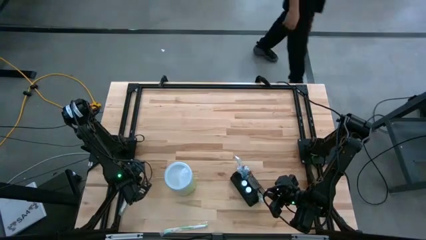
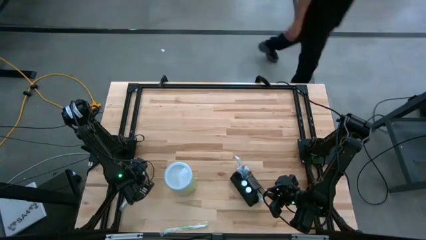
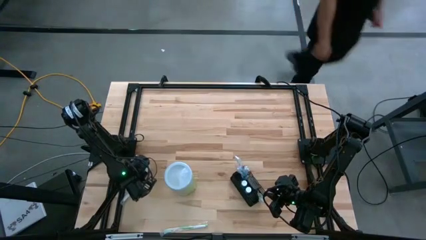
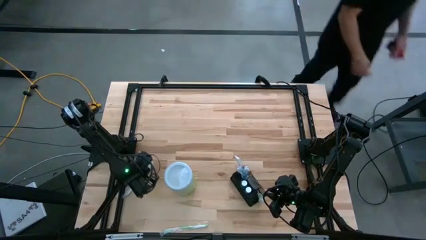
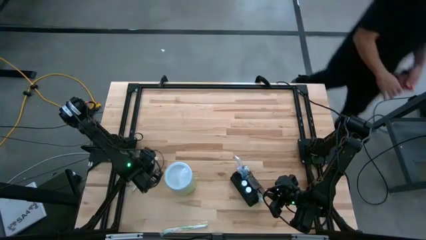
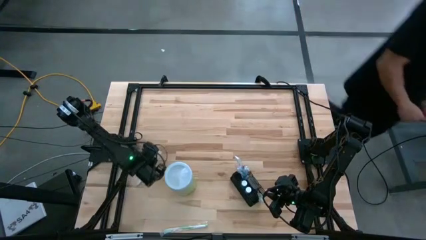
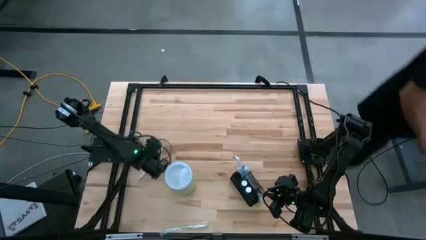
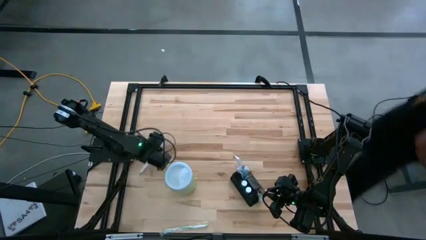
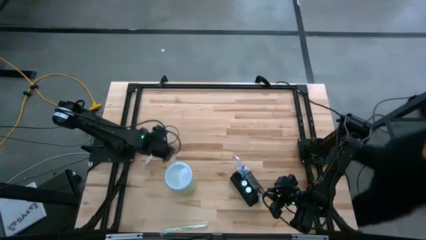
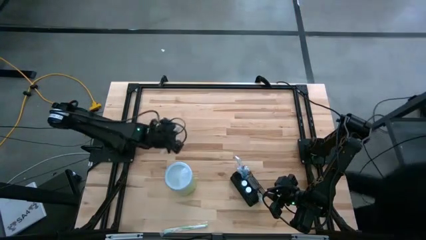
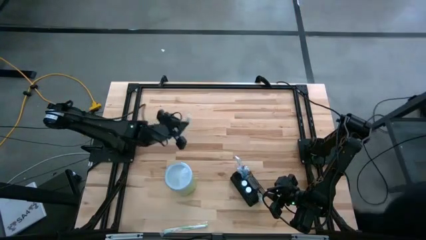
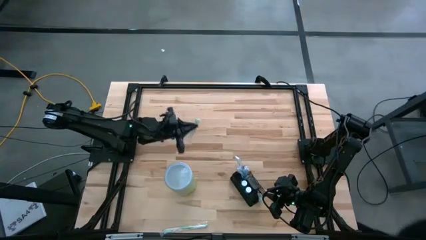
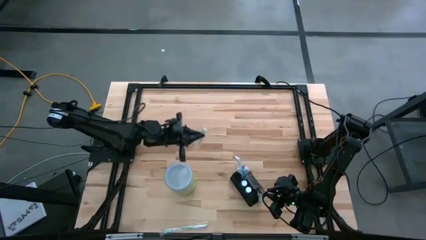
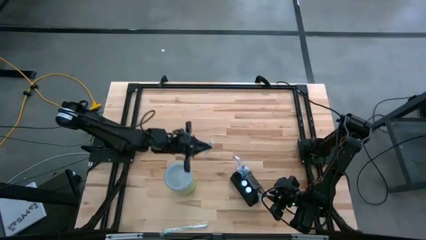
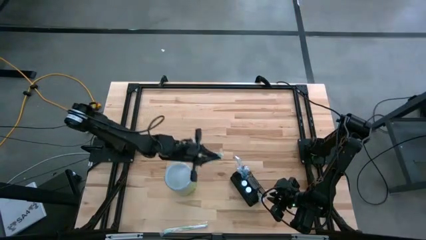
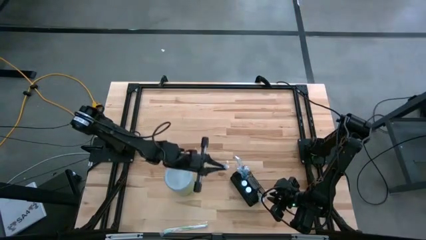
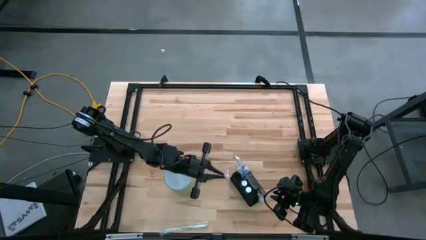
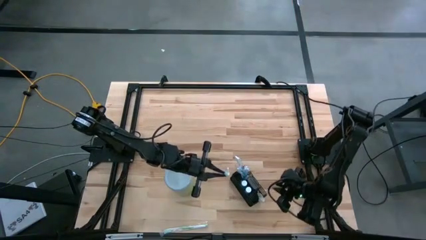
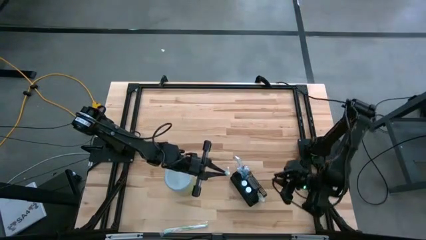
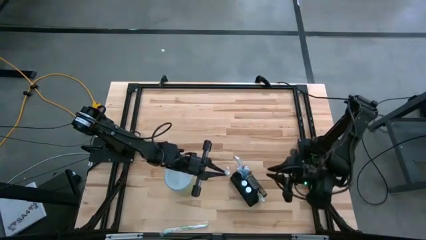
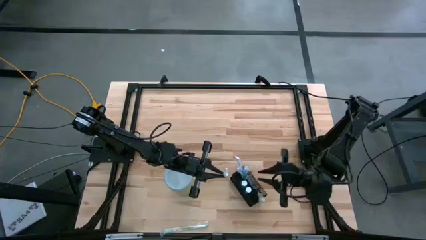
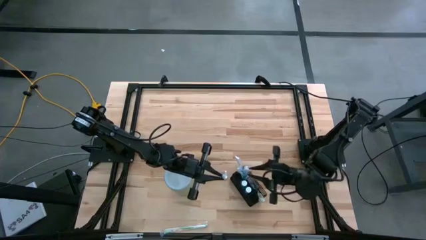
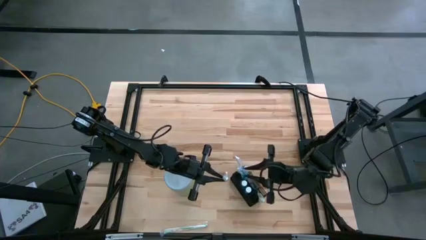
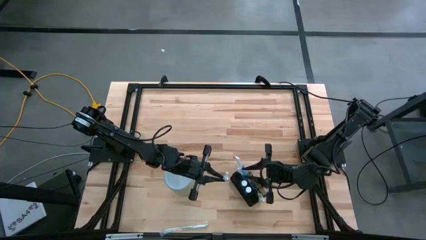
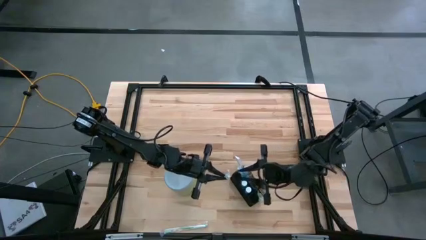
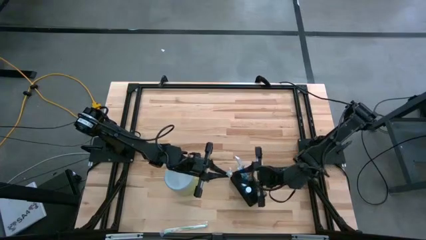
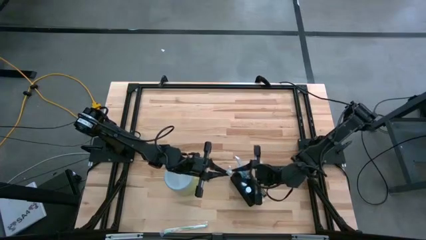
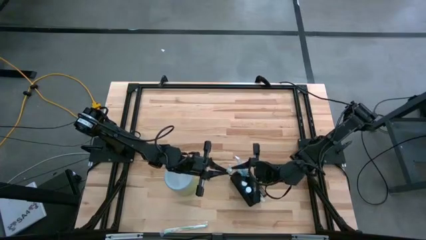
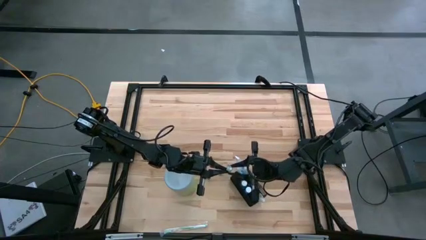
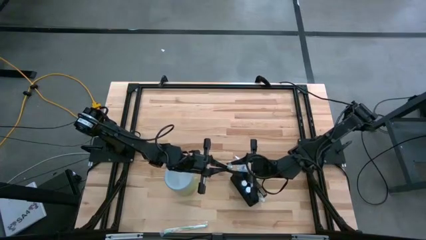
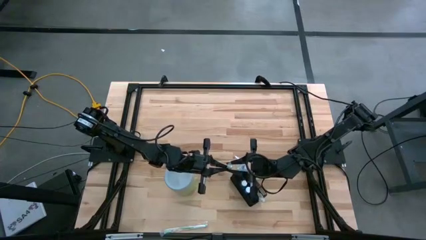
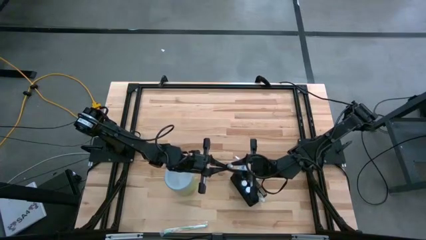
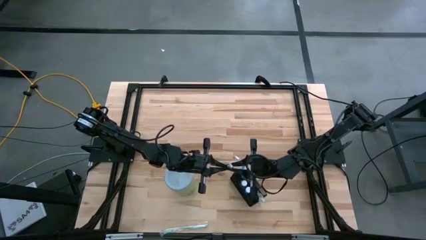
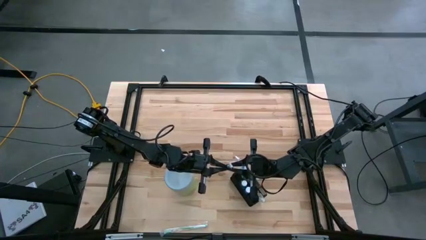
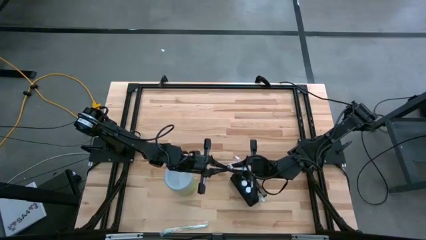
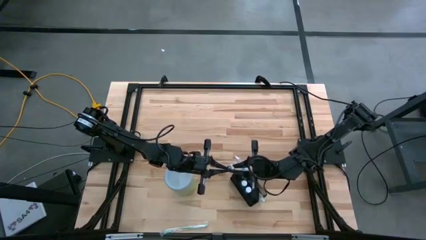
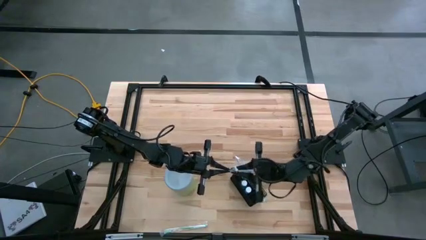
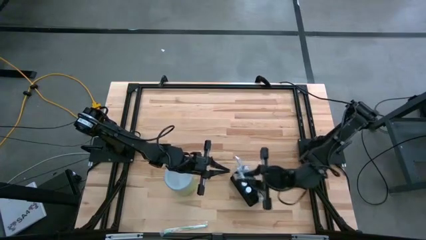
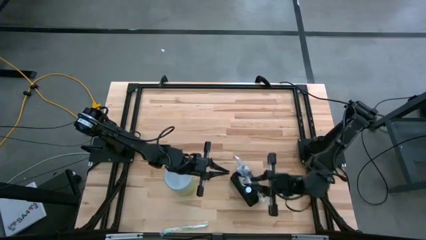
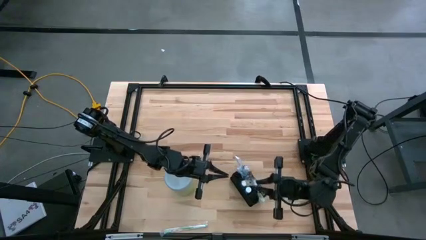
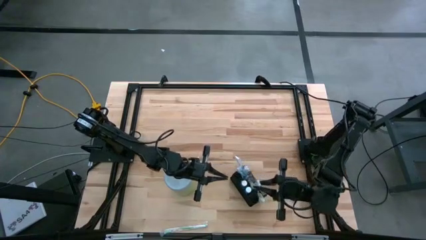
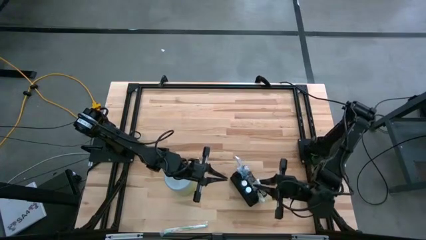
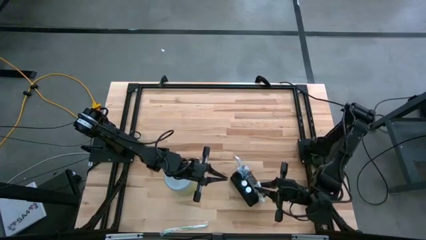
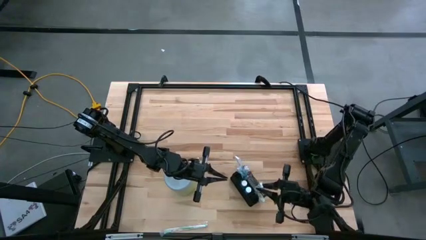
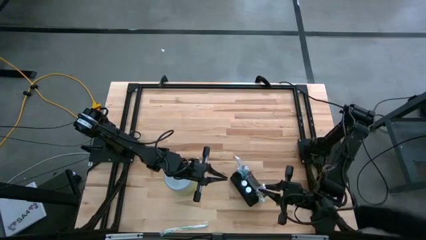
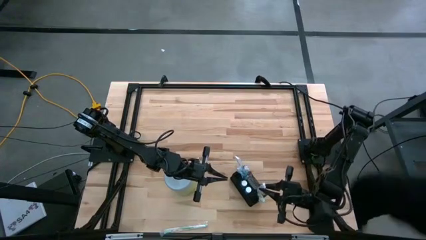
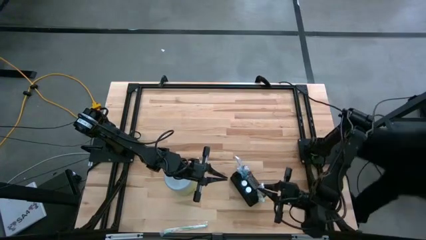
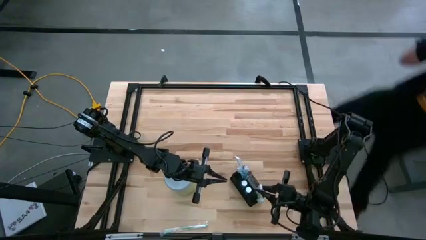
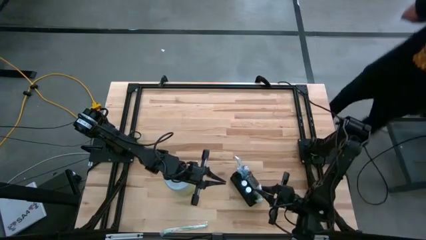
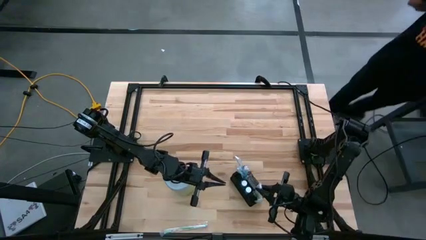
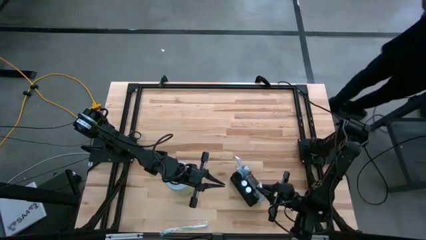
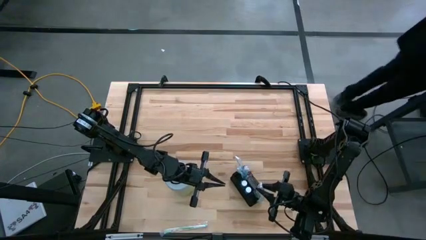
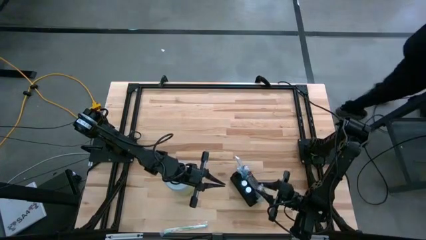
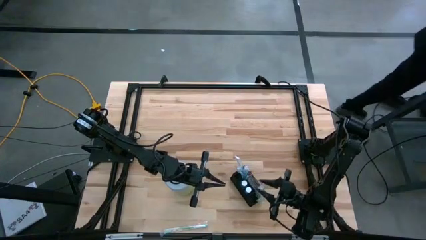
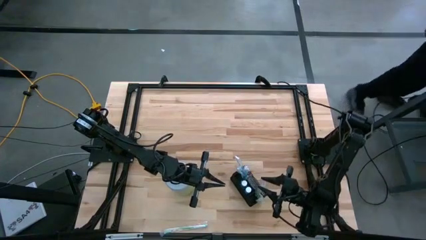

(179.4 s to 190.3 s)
Task: Pick & Place toothbrushing station
Put the top green toothbrush into the black mesh organizer

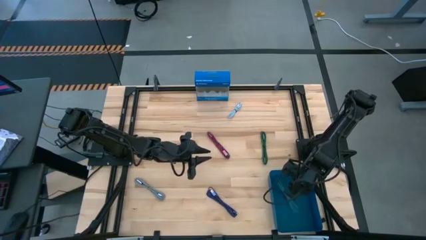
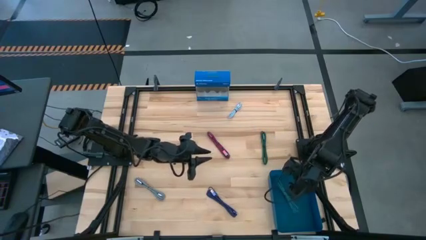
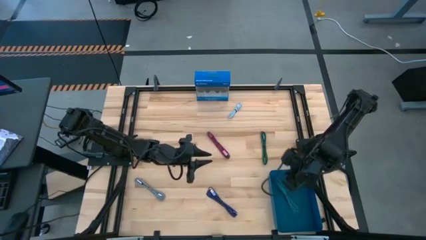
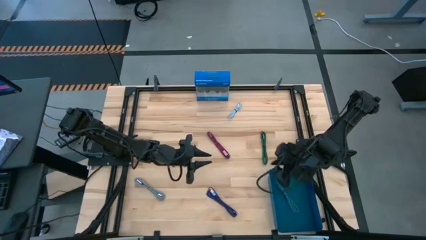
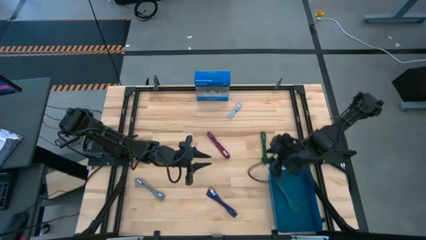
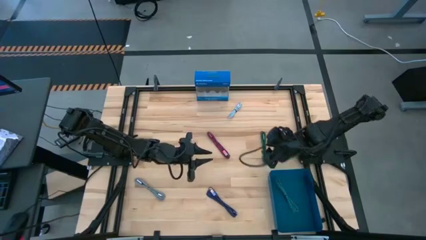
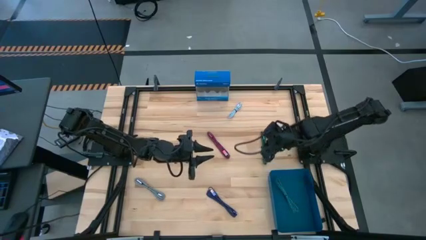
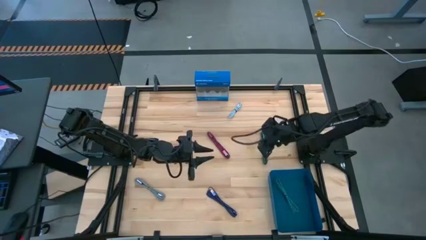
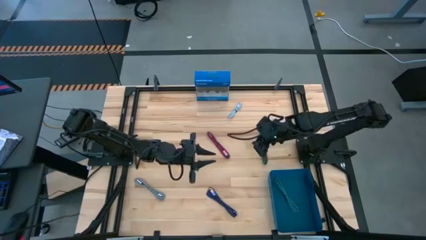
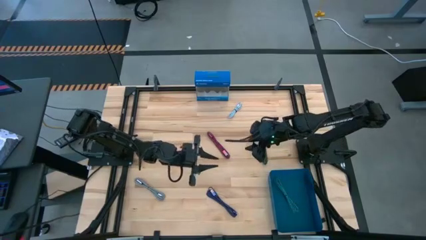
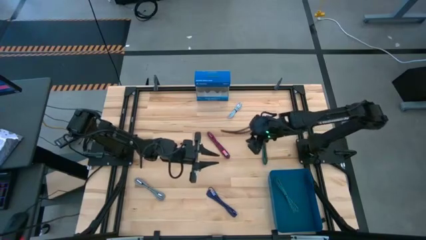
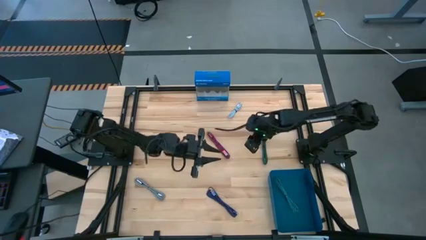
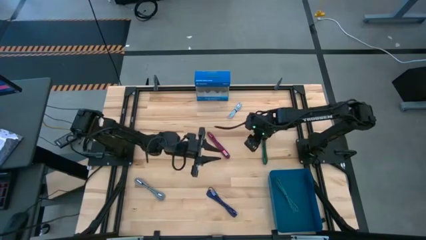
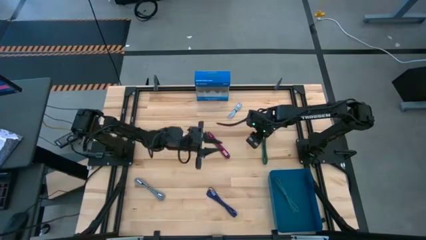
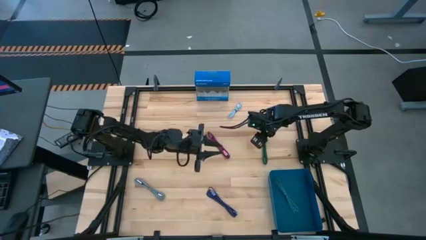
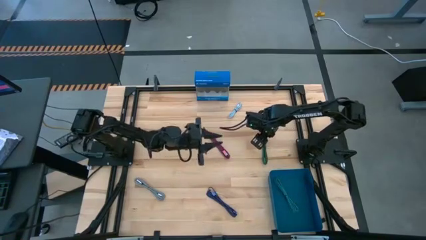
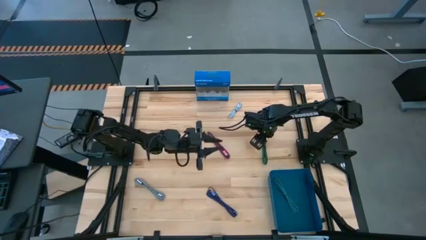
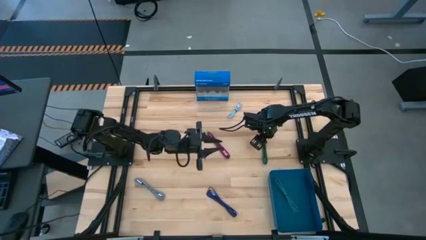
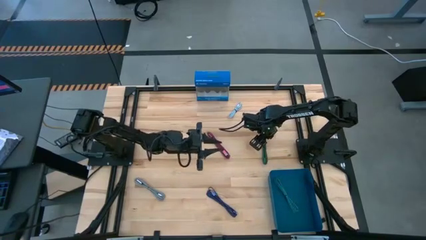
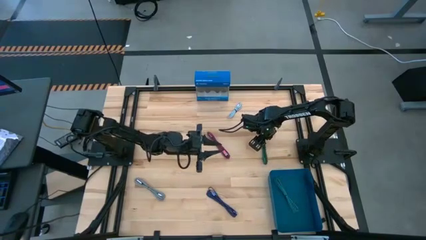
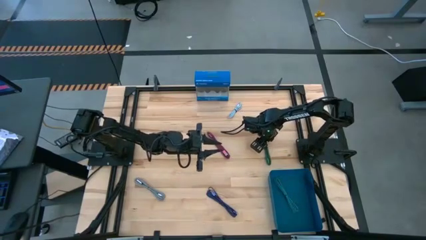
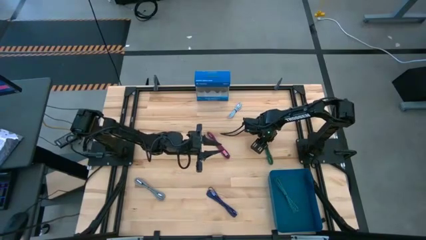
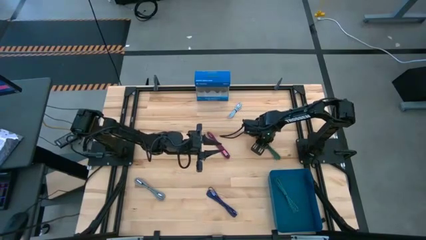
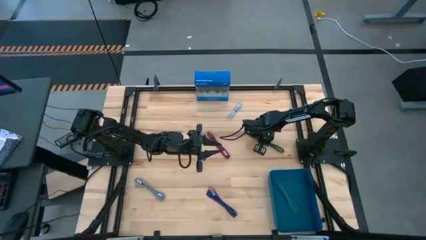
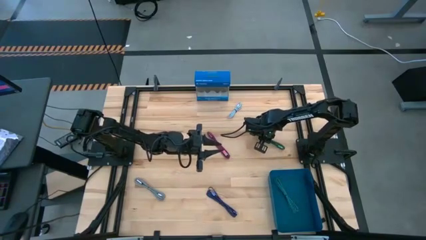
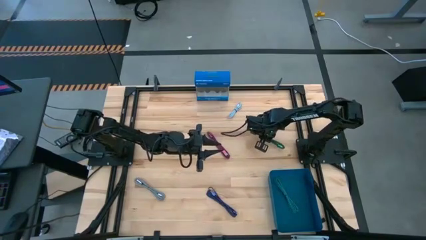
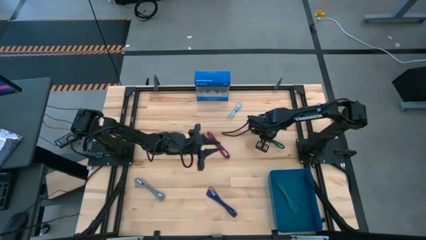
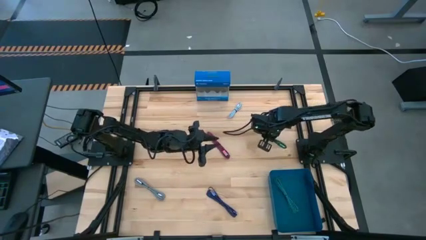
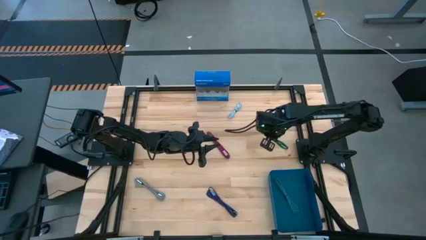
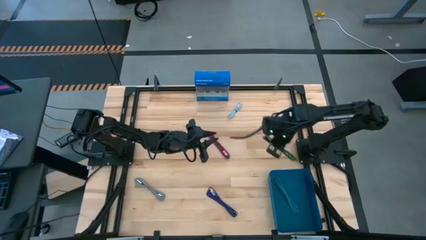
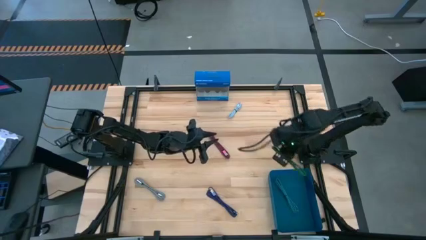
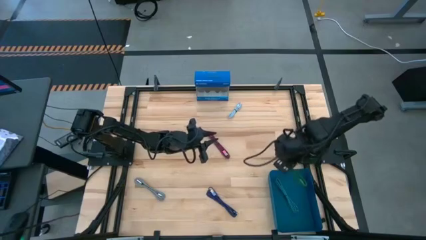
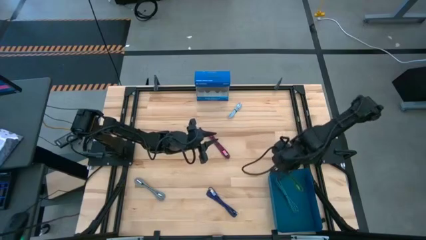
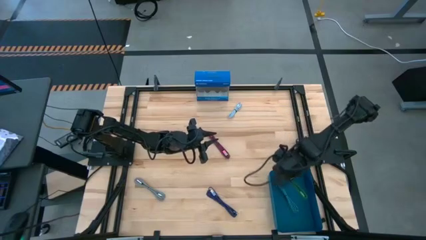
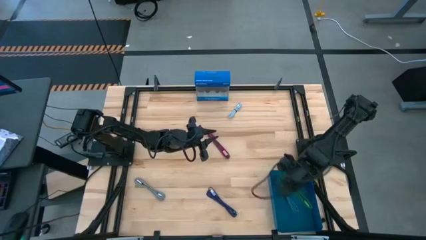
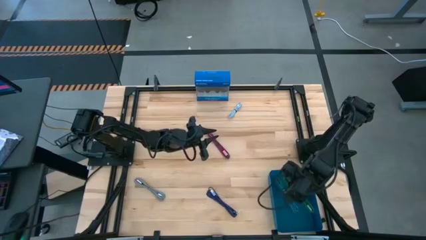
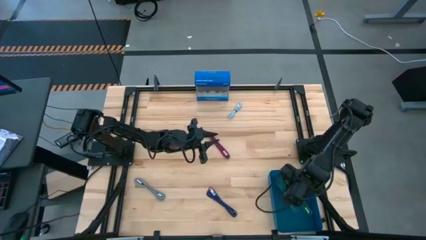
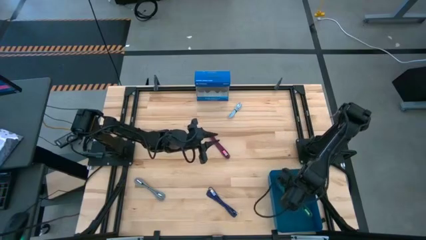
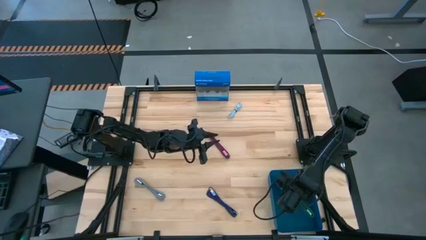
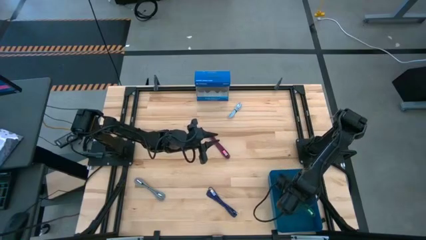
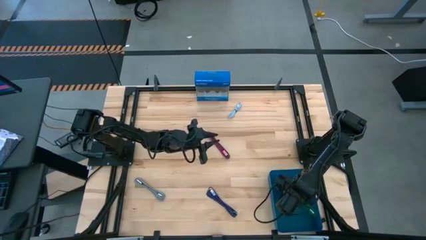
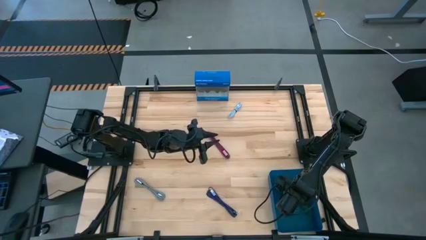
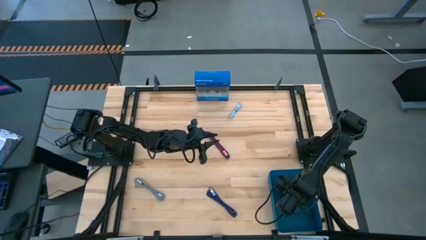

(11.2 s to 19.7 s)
Task: Pick and place USB-C Cables
Put the green USB cable into the blue bin
